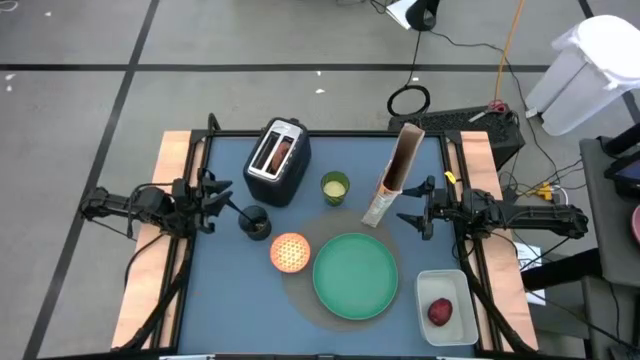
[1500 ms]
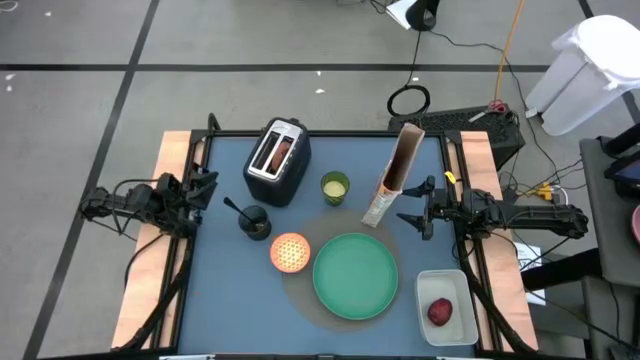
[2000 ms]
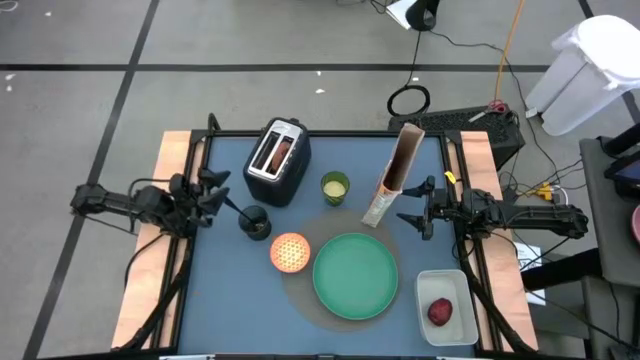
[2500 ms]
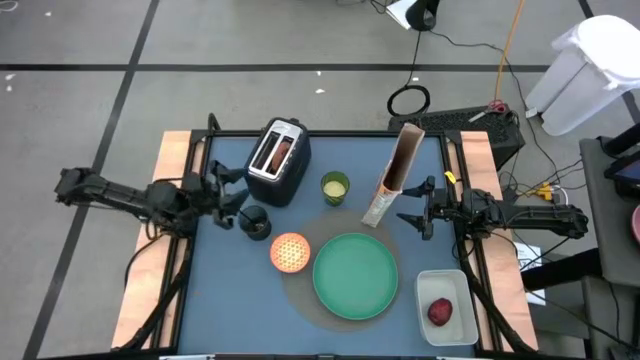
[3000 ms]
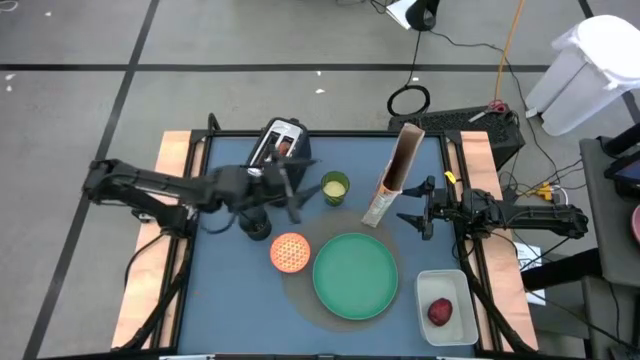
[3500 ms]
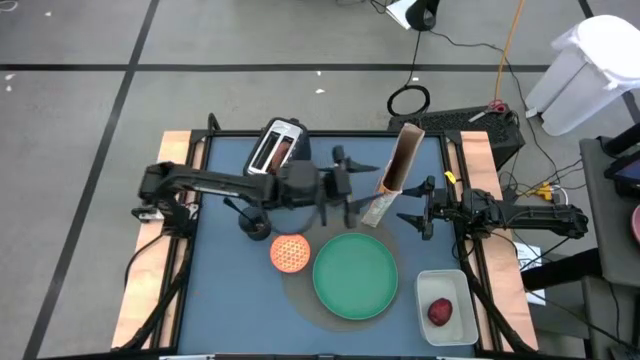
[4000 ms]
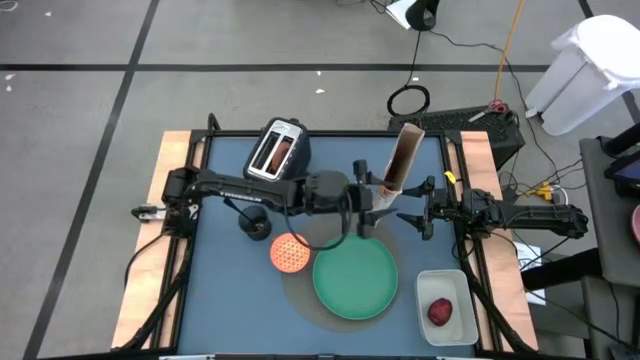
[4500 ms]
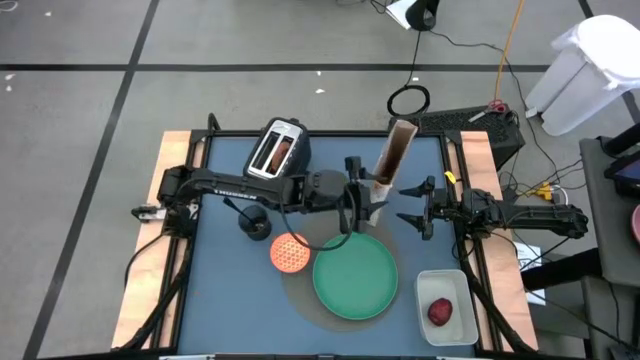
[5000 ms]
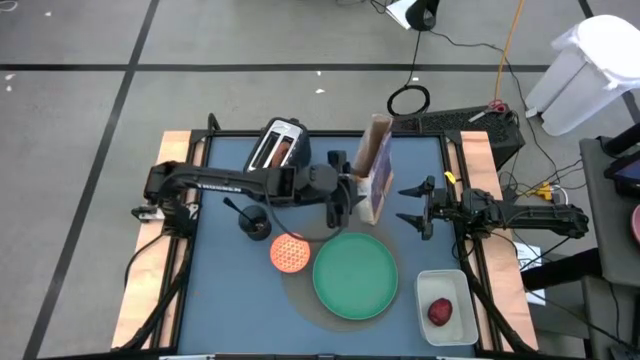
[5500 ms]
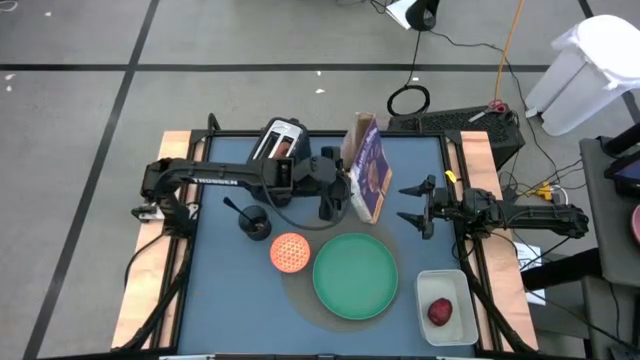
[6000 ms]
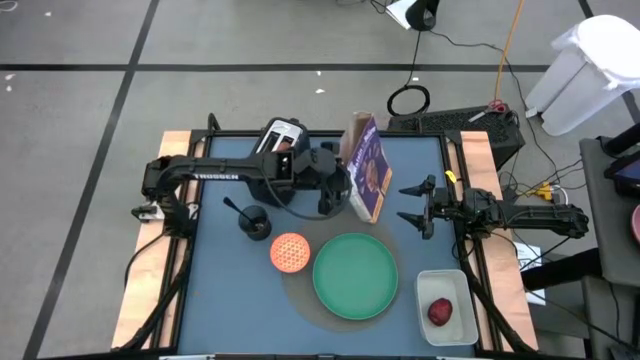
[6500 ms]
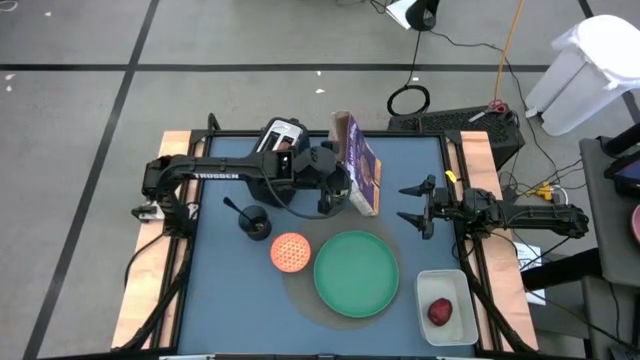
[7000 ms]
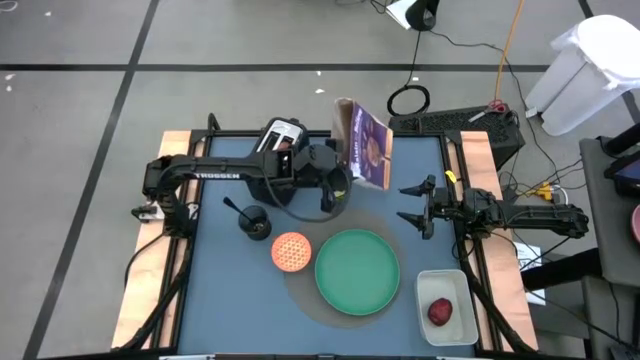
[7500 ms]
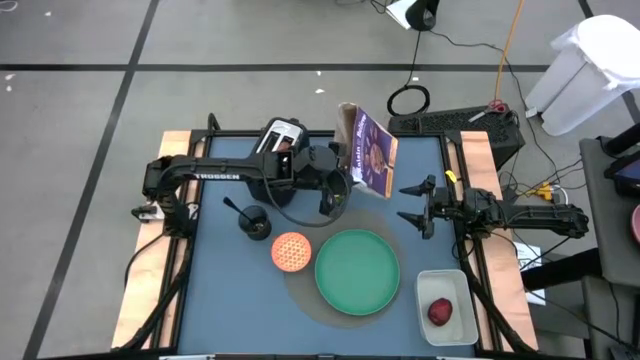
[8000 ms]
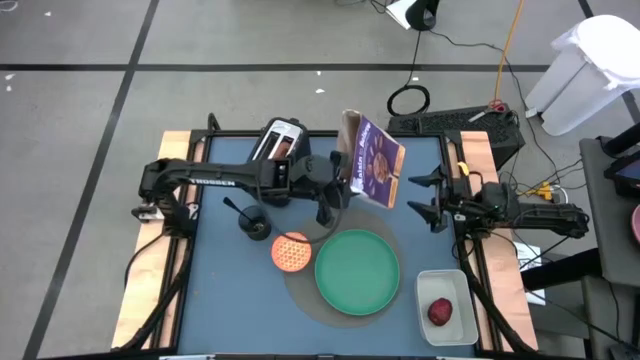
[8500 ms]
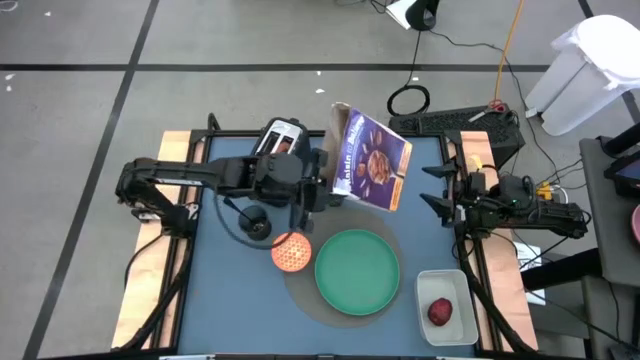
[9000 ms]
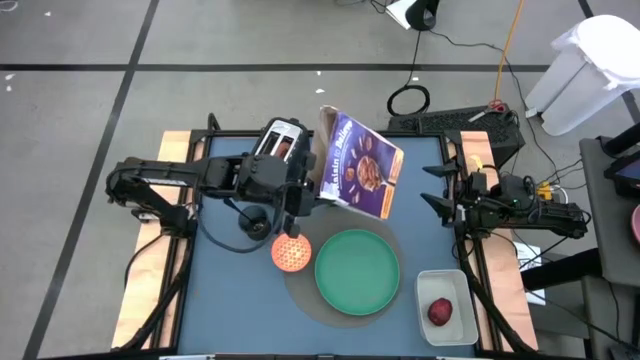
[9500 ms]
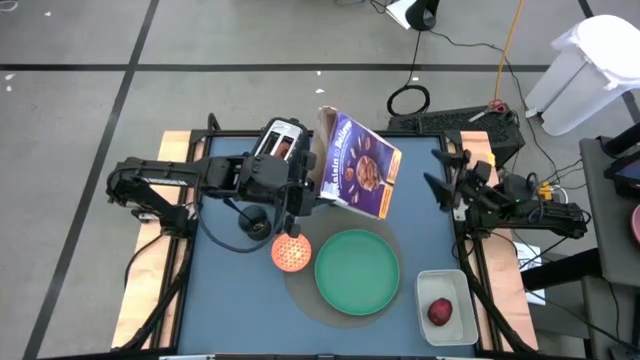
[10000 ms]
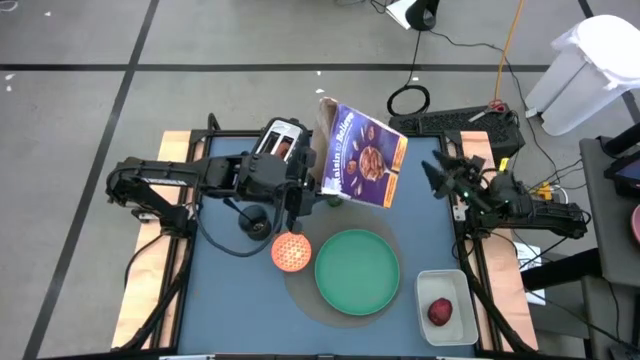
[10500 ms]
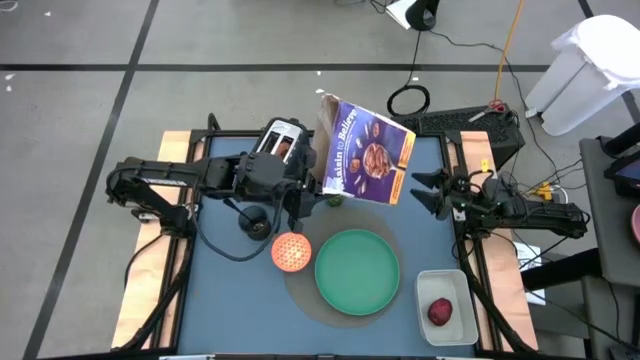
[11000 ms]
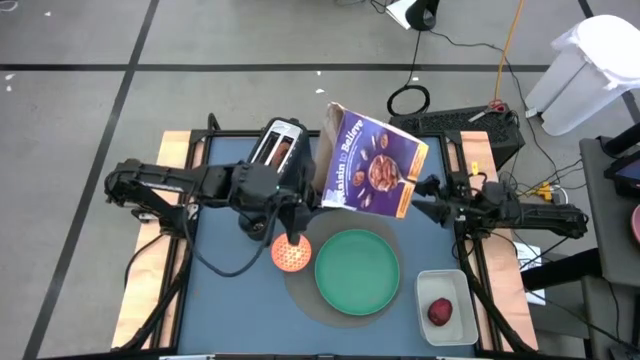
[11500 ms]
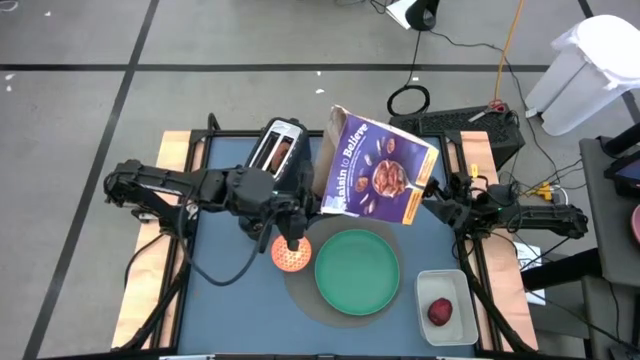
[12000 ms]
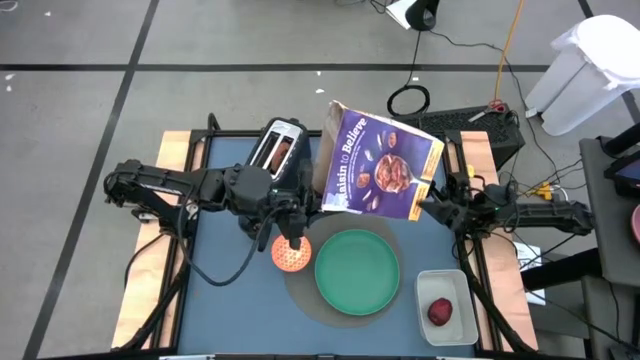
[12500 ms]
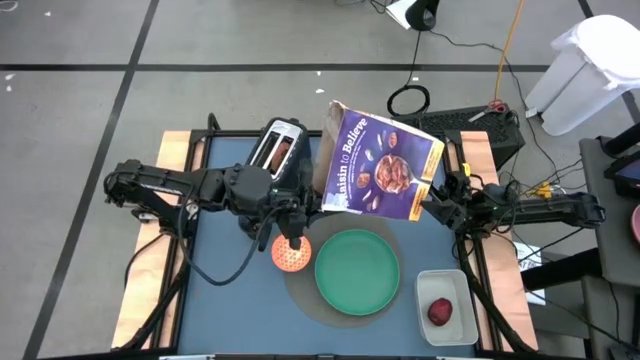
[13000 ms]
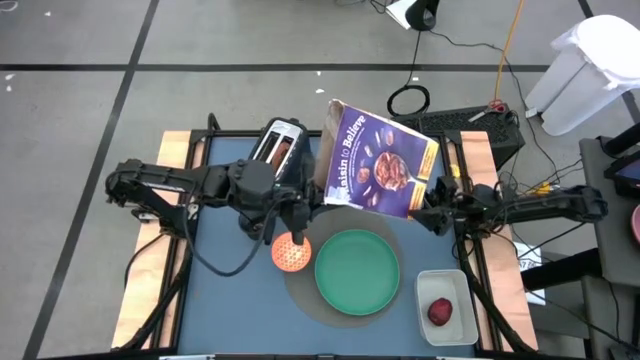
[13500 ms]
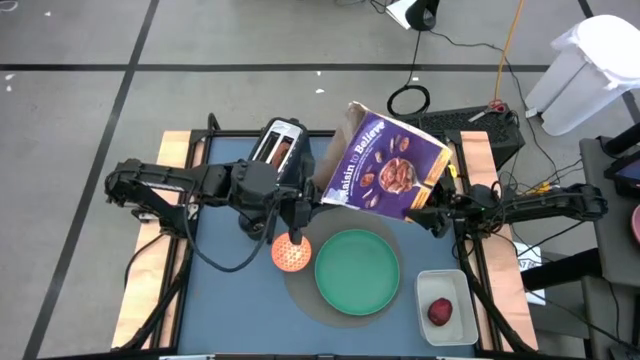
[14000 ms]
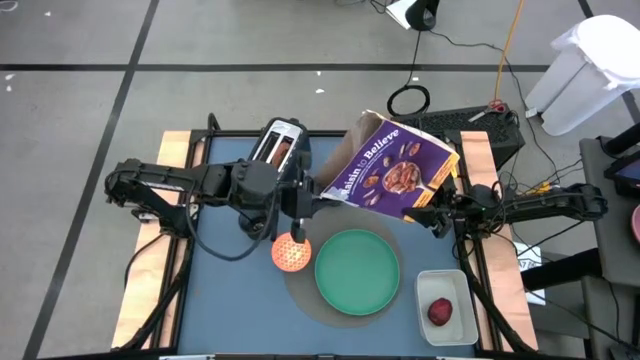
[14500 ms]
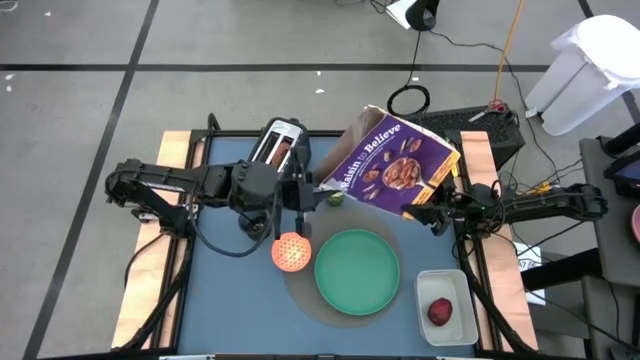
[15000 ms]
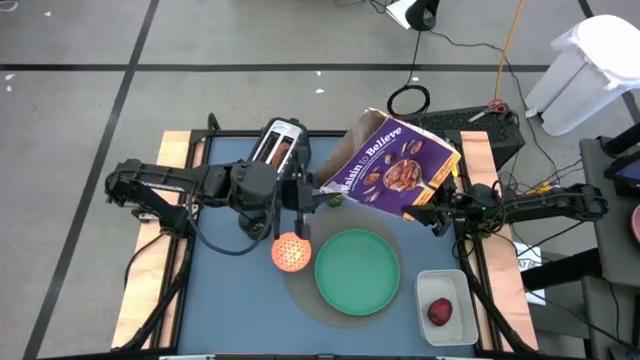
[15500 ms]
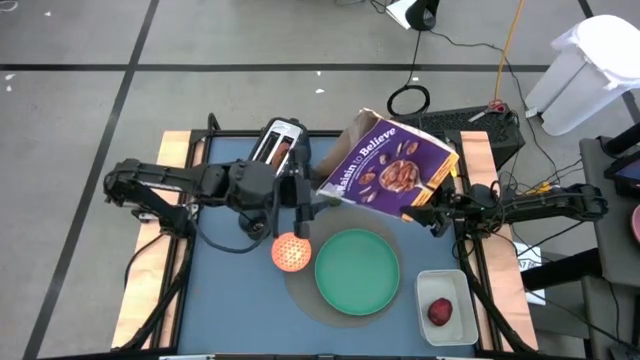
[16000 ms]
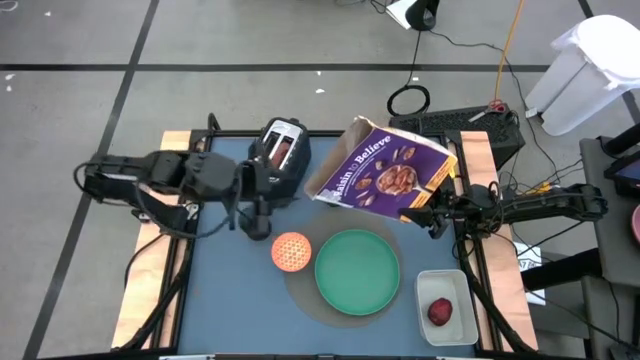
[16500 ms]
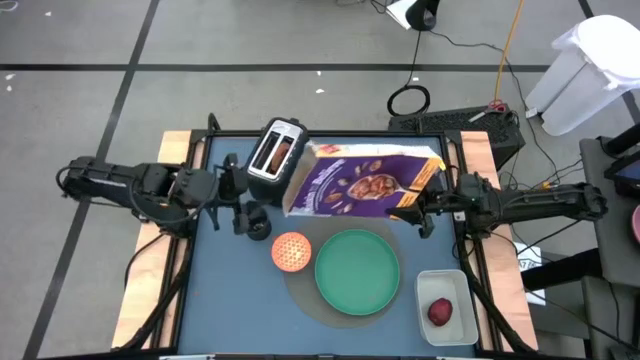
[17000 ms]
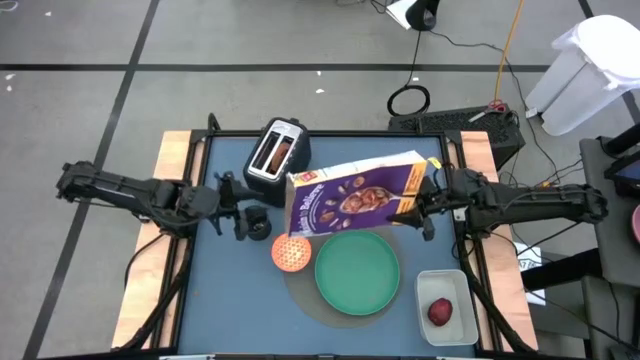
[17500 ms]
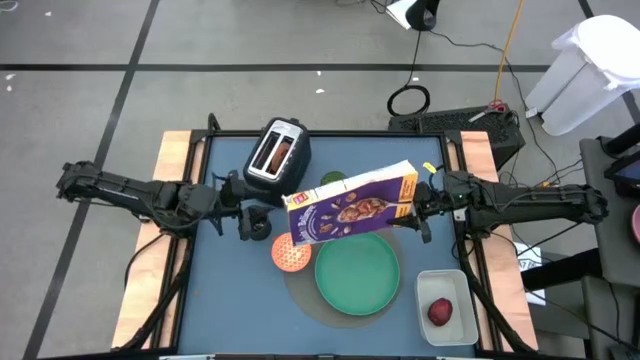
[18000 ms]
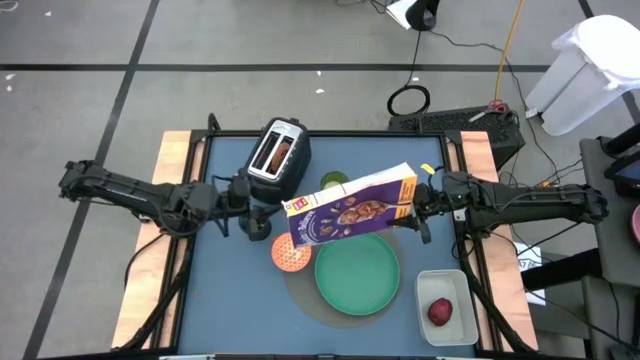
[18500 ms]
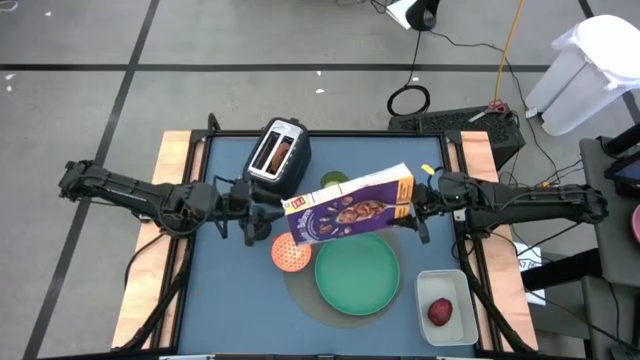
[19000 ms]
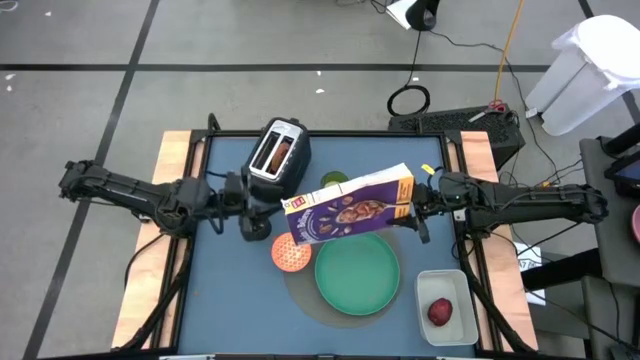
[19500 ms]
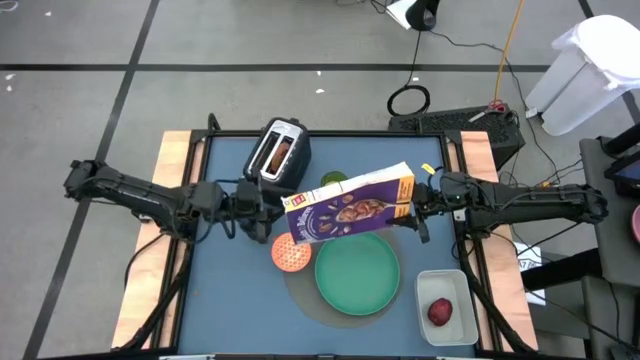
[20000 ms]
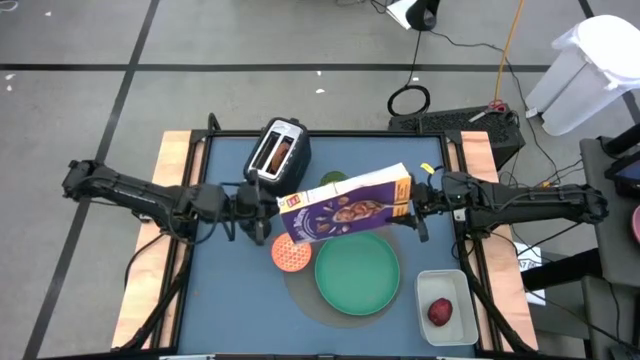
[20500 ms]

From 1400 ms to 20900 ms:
Task: Arrange a breakfast setting
Pour the cereal into the orange bowl
